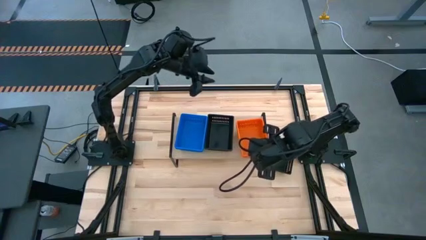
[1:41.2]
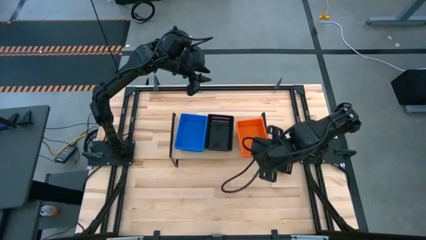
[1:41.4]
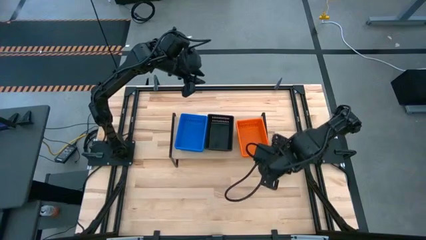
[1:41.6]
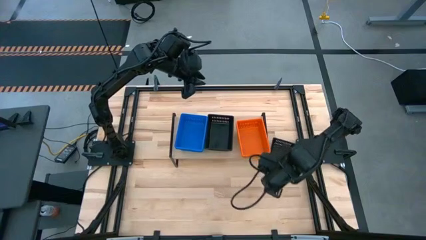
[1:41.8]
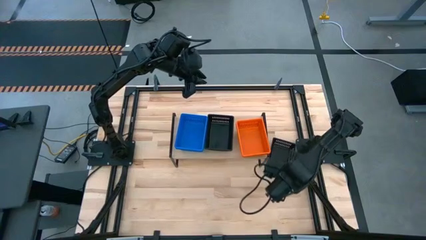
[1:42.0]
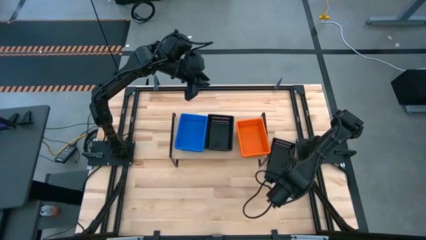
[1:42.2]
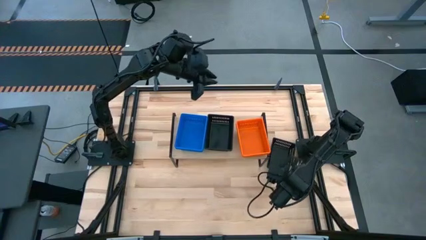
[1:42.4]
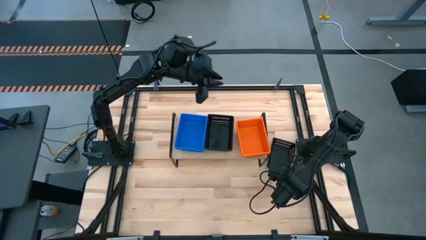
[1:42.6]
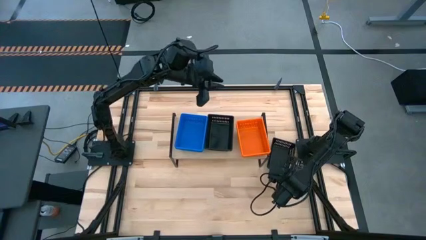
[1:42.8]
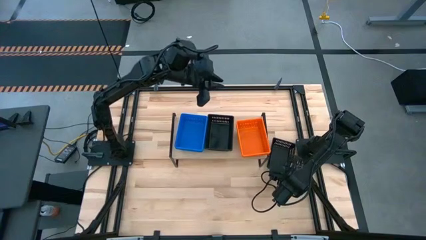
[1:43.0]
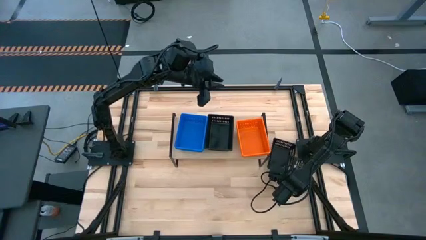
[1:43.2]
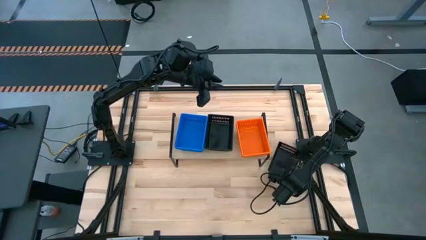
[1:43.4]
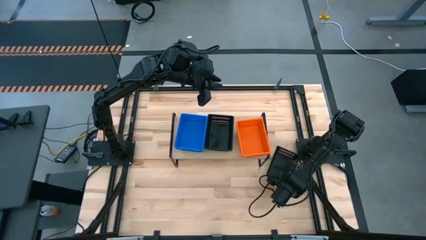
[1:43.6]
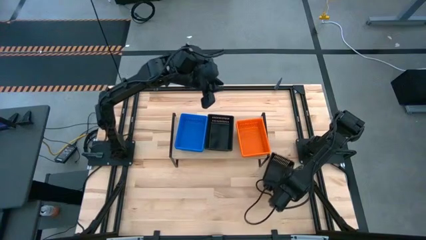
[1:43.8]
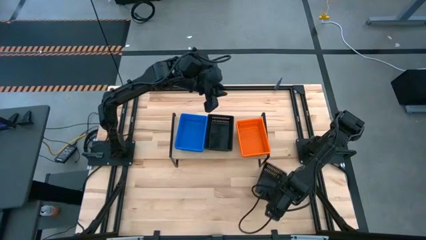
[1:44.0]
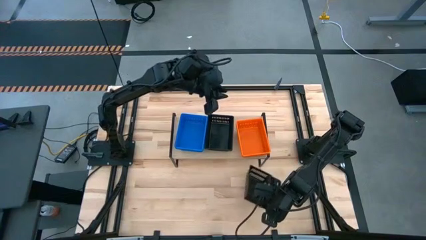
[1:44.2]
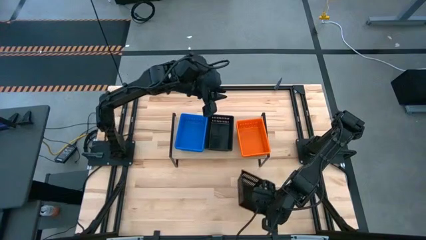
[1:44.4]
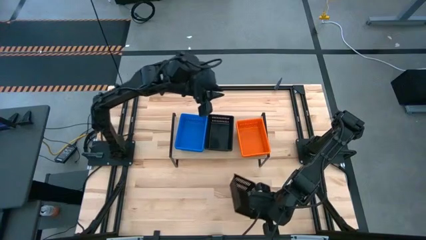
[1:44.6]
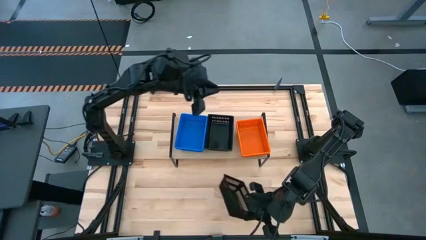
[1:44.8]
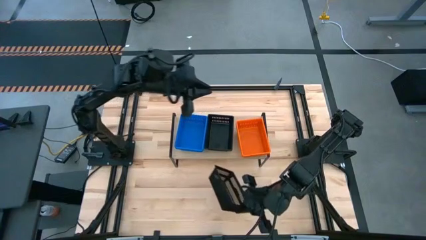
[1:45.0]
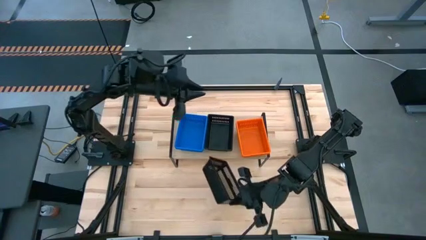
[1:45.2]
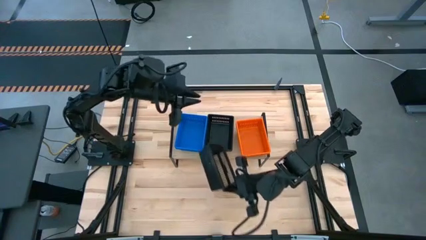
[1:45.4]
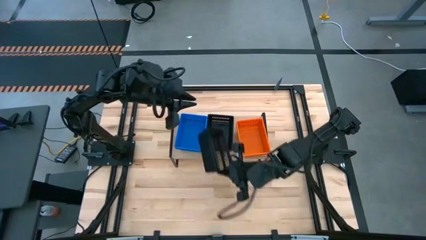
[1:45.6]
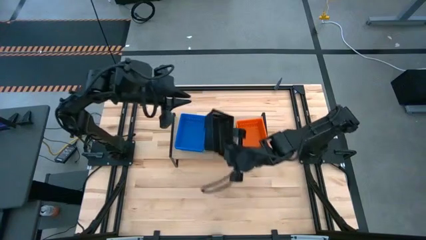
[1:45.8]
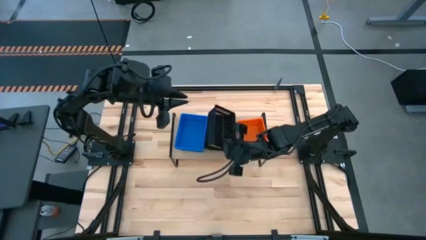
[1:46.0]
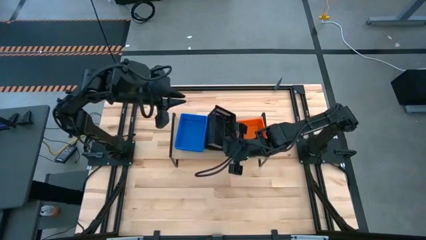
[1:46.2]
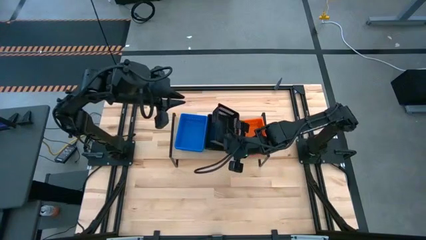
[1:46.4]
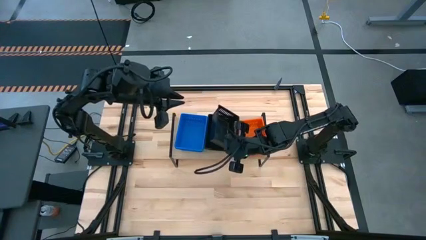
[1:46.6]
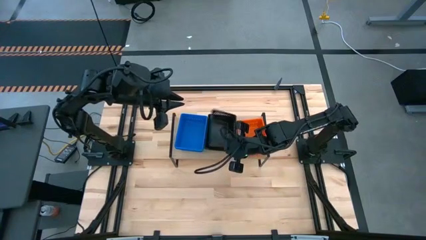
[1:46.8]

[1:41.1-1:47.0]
Task: Stack baskets on shelf by color
Stack the black basket on the stacked black baskets on the shelf

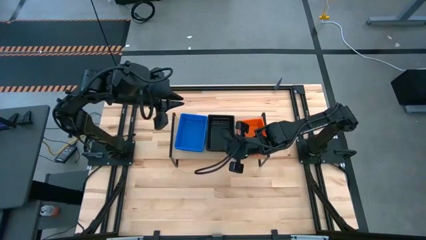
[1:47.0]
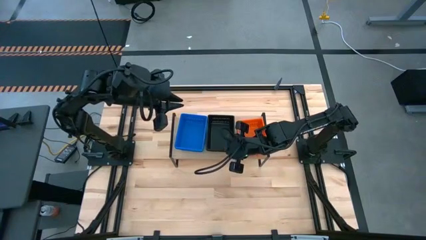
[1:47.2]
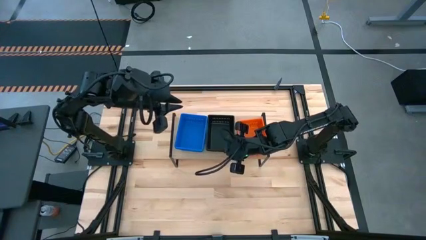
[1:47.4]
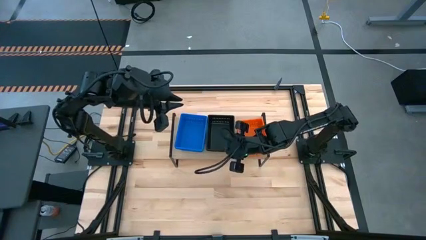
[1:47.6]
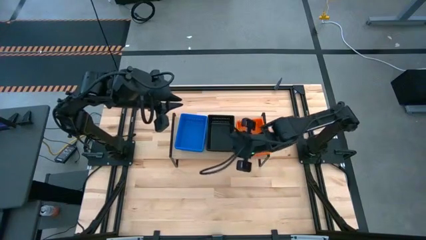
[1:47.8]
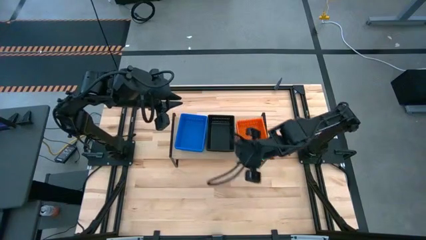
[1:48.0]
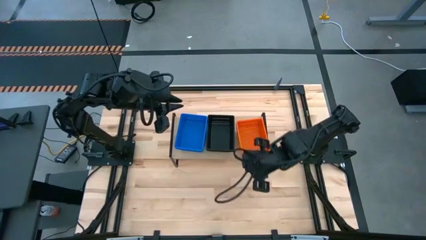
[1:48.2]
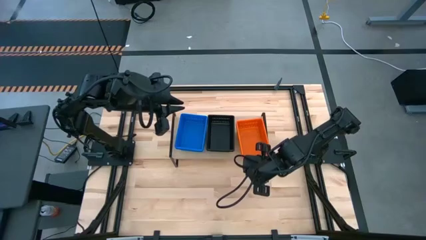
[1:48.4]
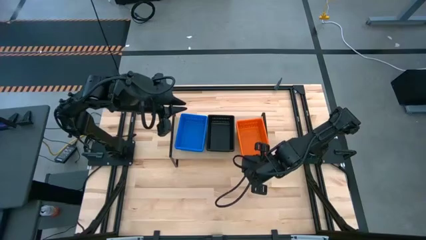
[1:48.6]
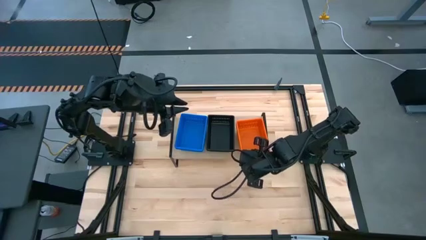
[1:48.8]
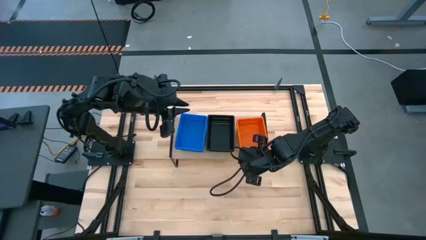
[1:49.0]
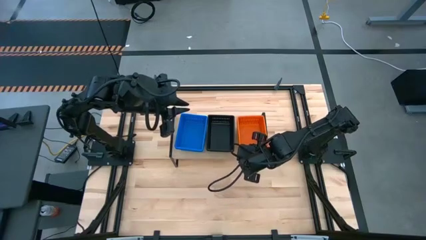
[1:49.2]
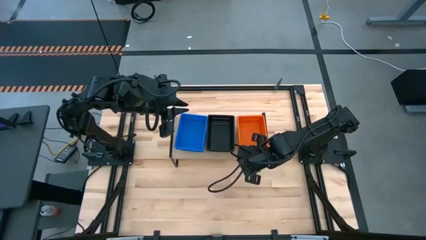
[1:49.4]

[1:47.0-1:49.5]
Adjust the stacked orange baskets on the shelf

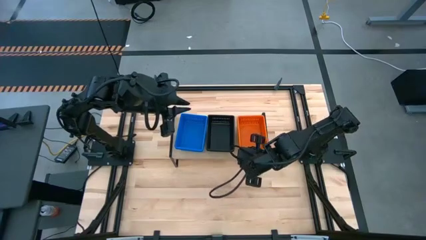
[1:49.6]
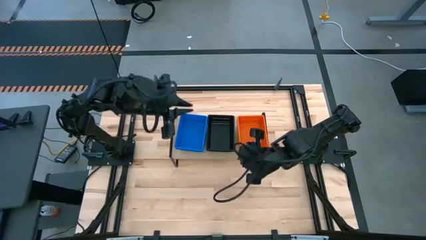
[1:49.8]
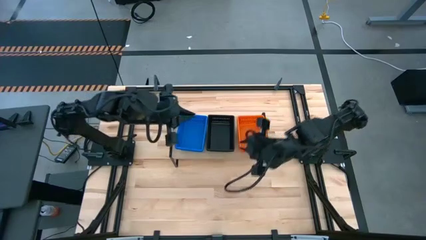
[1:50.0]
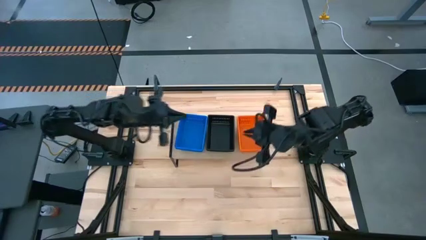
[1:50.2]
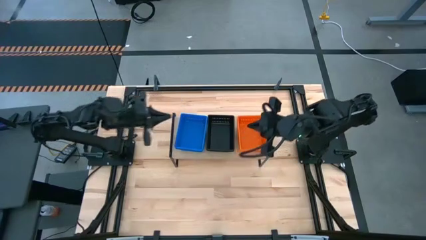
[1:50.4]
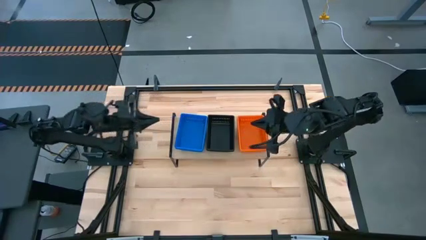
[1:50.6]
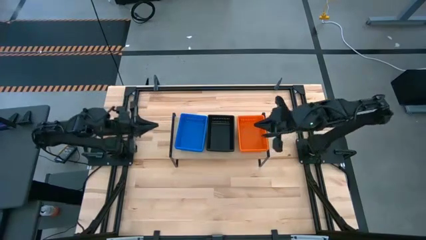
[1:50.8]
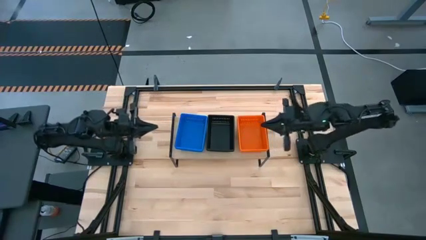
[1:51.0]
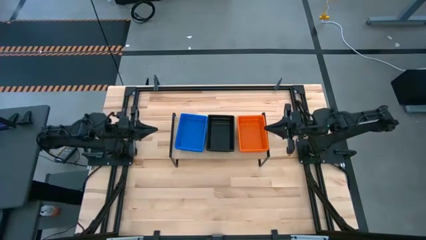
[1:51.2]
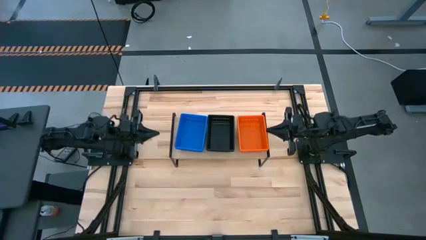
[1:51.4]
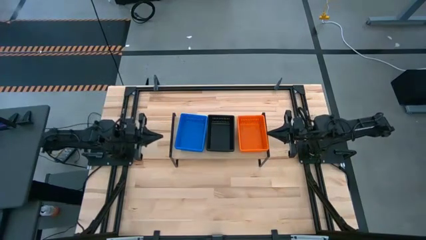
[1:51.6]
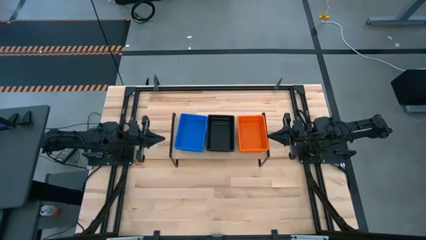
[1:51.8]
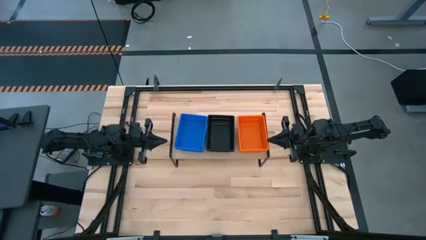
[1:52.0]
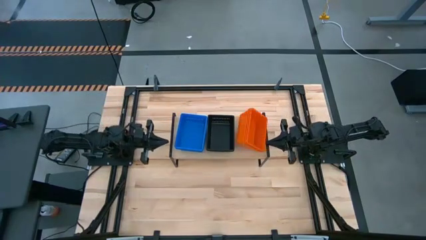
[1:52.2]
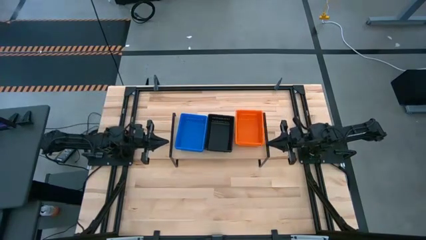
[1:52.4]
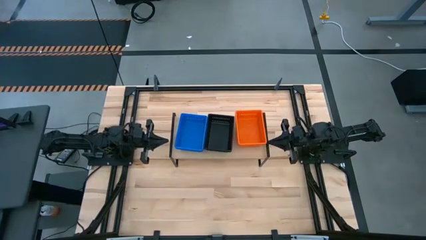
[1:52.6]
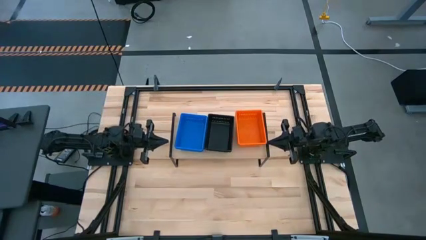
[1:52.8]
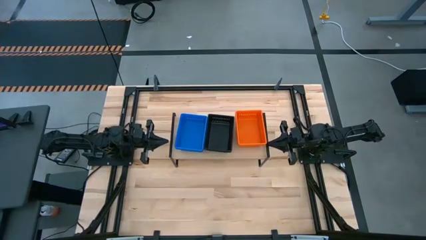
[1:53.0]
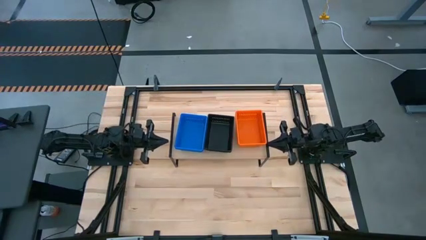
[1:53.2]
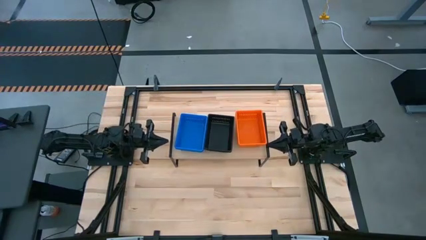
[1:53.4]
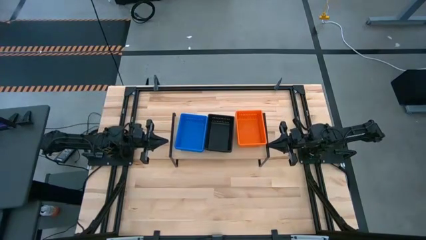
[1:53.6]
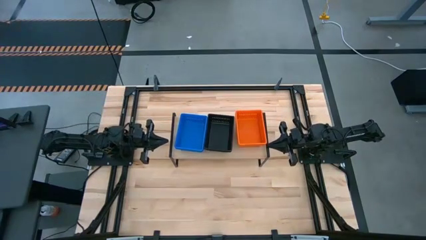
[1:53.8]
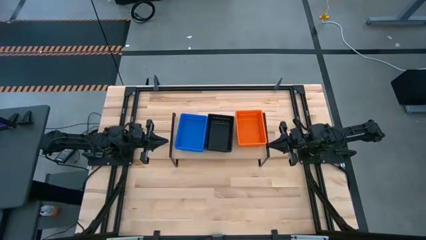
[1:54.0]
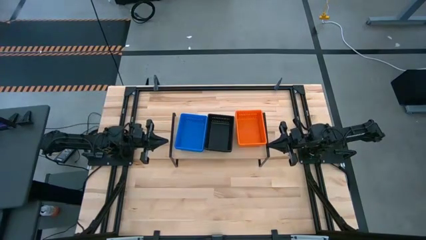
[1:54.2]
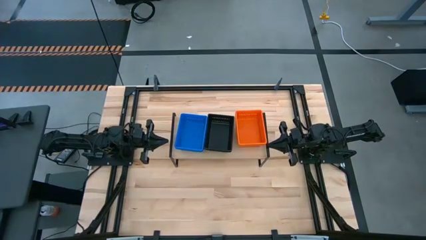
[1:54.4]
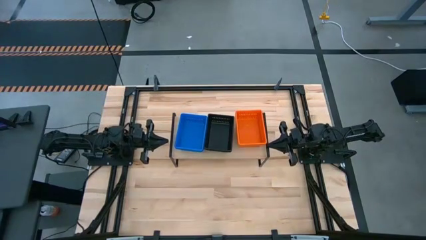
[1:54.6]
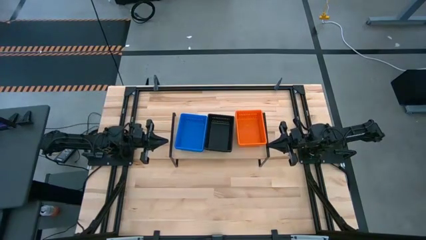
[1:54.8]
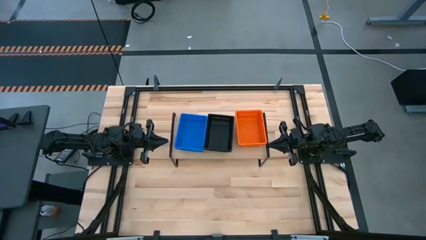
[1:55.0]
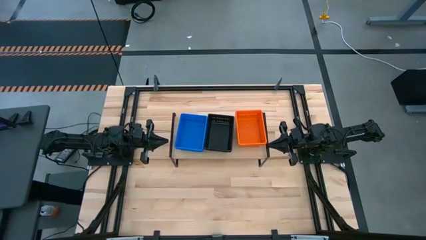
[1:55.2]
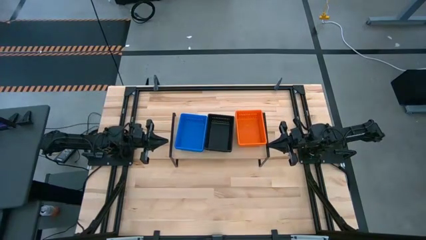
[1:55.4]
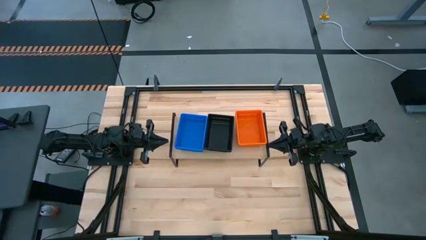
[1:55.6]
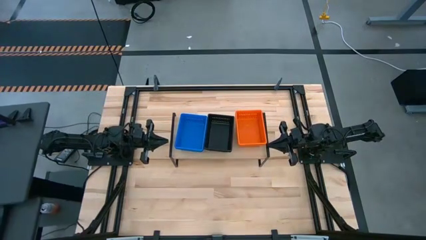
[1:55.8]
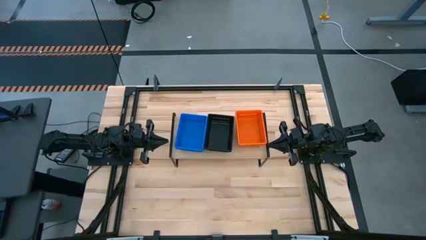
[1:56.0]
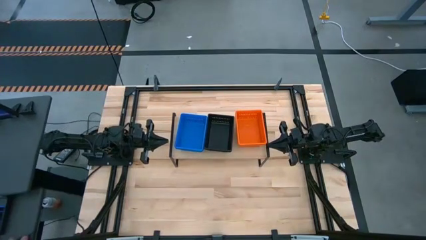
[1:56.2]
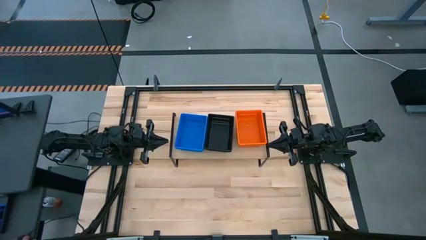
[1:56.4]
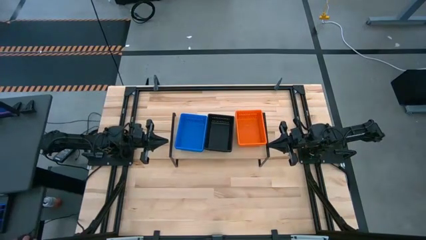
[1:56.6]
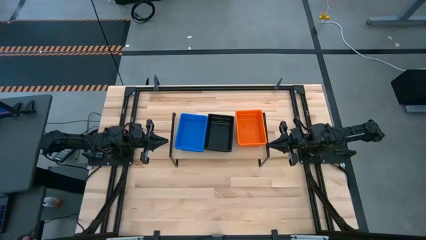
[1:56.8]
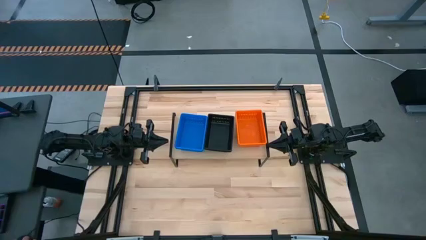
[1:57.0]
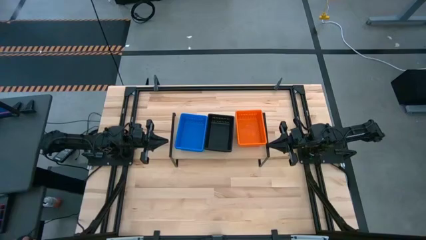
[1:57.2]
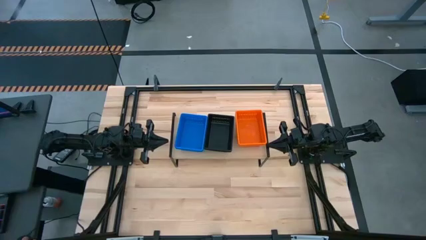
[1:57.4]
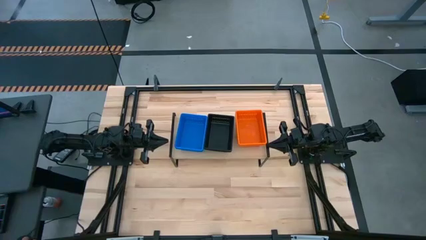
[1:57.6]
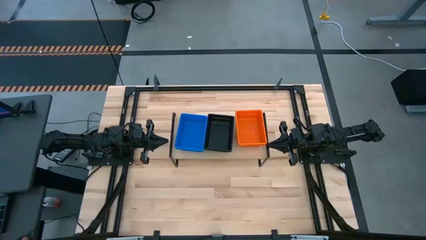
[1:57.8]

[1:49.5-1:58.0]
Return to Home Position
